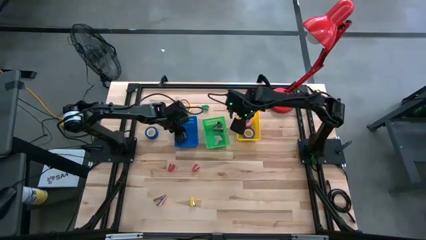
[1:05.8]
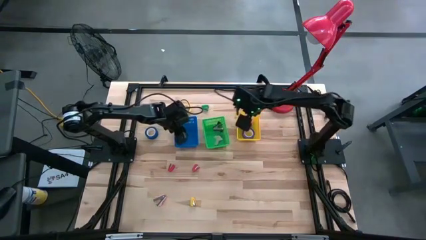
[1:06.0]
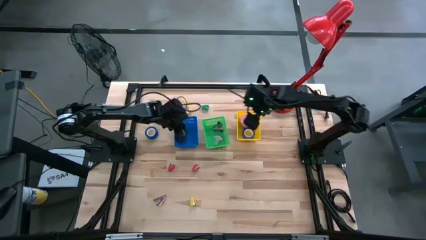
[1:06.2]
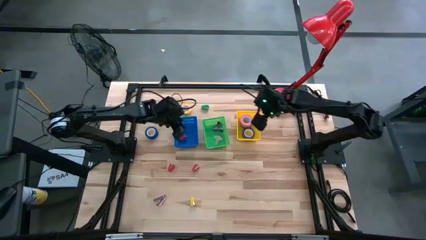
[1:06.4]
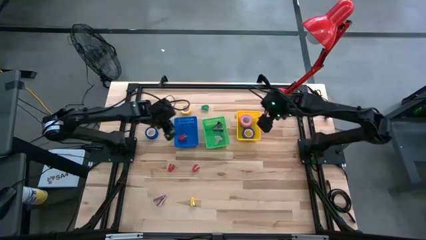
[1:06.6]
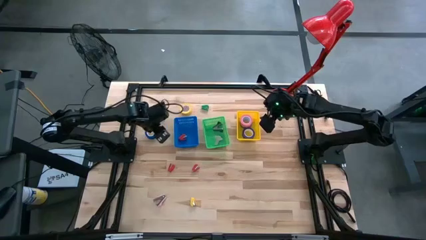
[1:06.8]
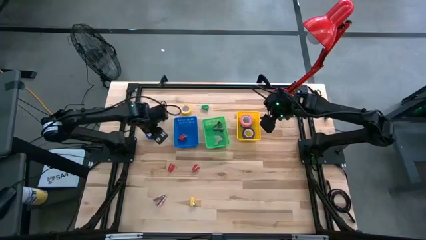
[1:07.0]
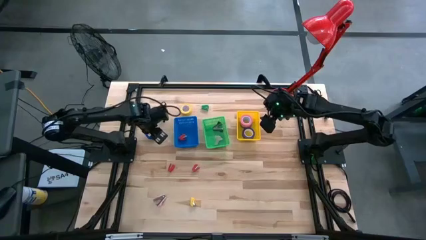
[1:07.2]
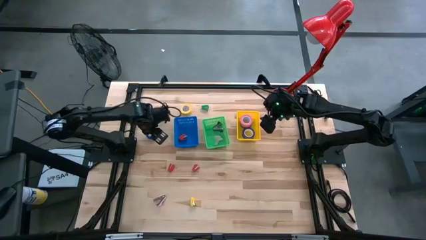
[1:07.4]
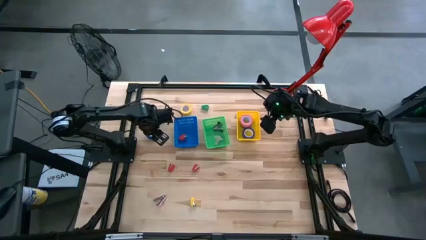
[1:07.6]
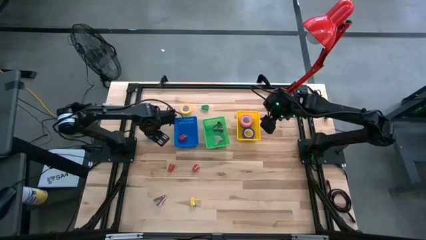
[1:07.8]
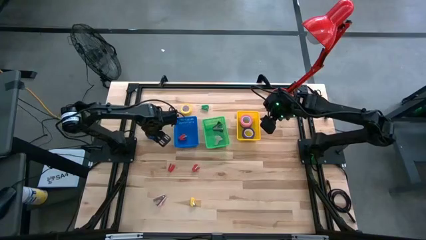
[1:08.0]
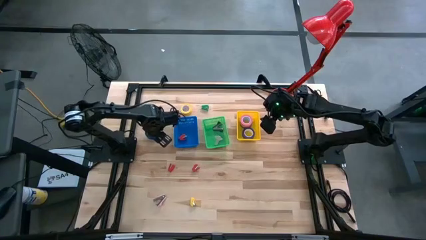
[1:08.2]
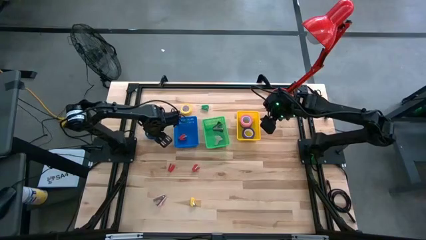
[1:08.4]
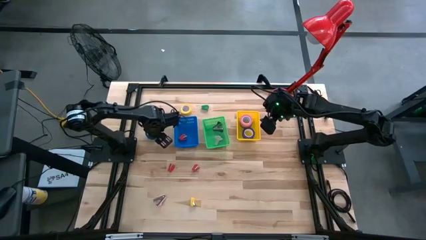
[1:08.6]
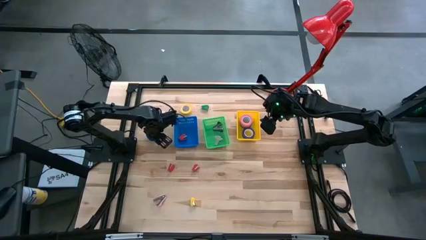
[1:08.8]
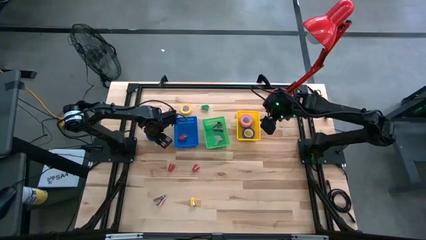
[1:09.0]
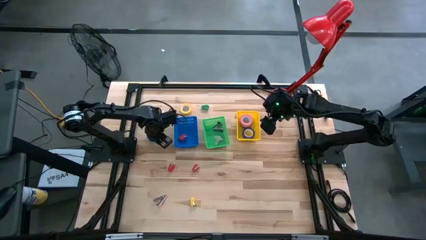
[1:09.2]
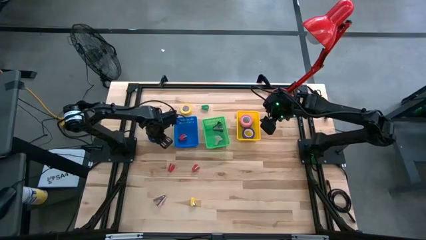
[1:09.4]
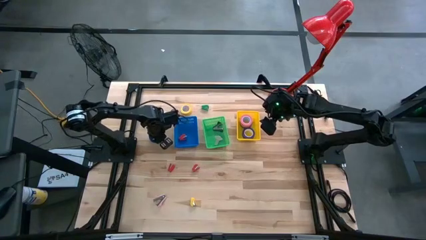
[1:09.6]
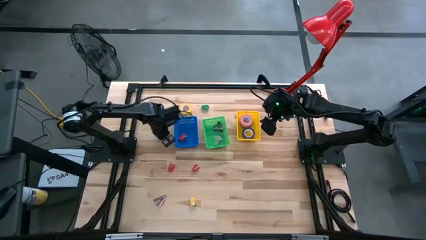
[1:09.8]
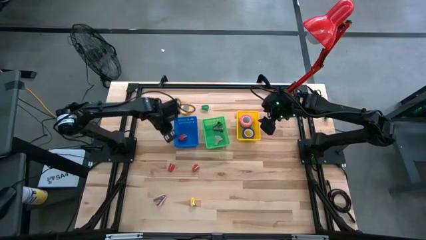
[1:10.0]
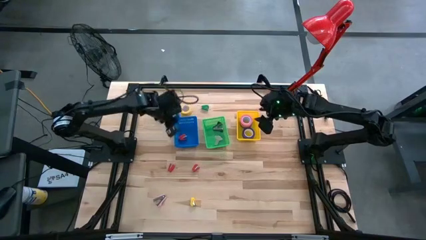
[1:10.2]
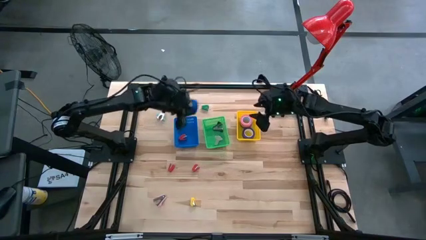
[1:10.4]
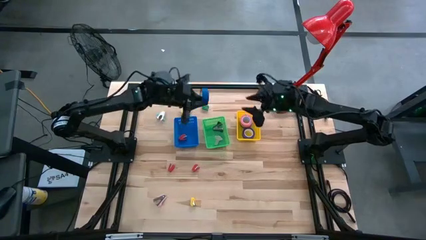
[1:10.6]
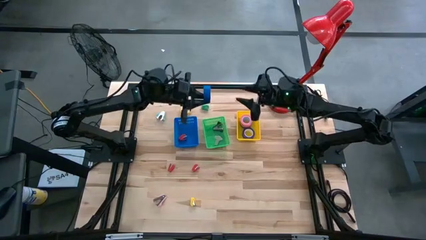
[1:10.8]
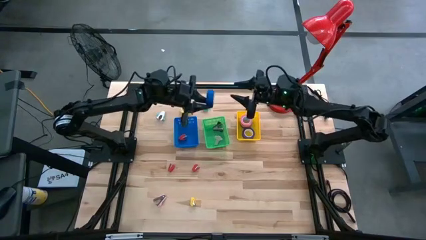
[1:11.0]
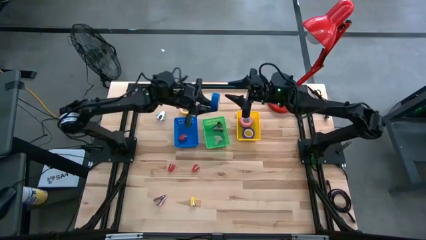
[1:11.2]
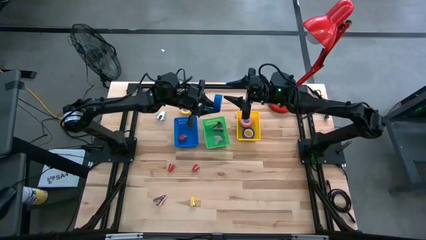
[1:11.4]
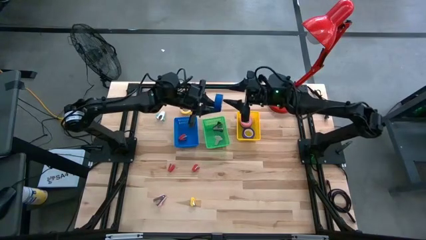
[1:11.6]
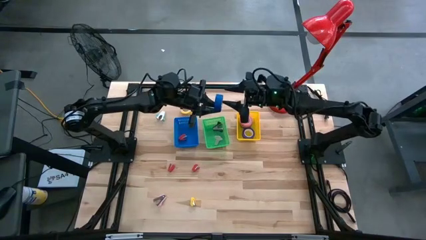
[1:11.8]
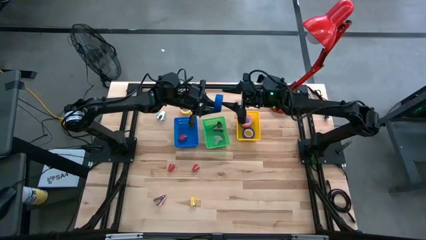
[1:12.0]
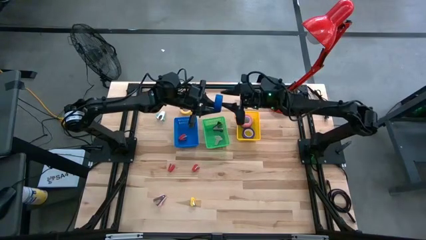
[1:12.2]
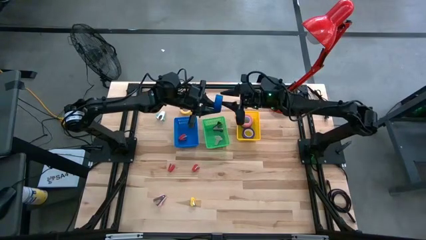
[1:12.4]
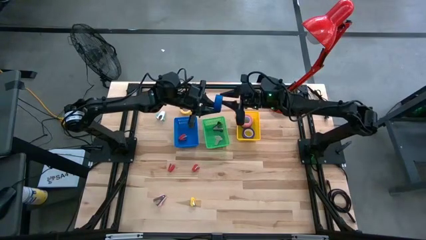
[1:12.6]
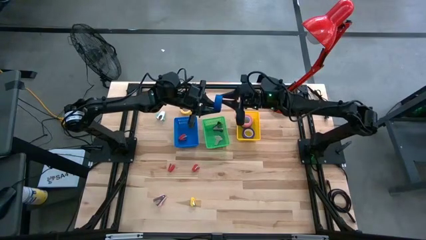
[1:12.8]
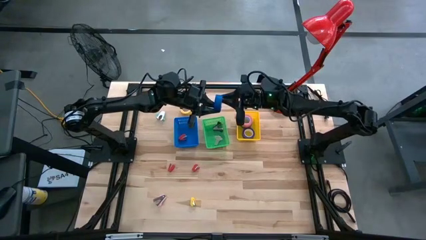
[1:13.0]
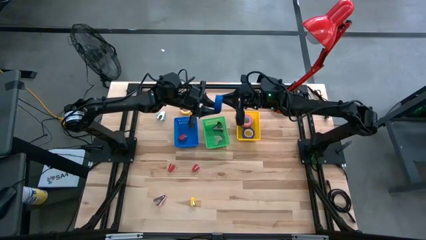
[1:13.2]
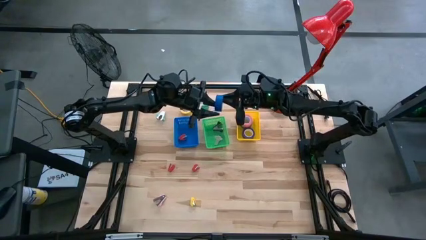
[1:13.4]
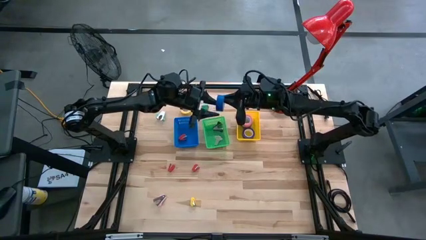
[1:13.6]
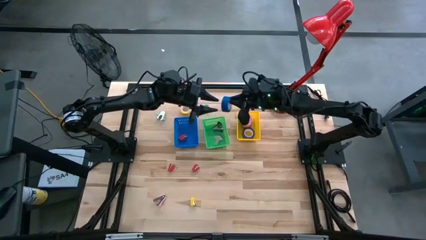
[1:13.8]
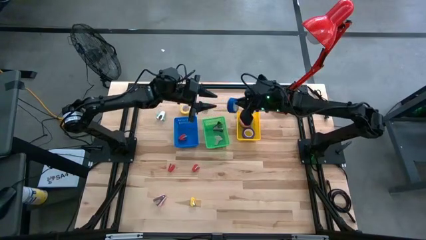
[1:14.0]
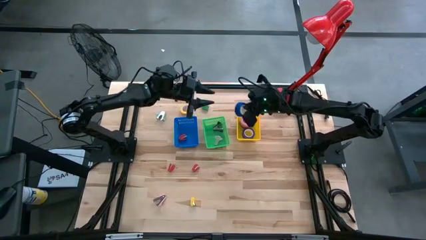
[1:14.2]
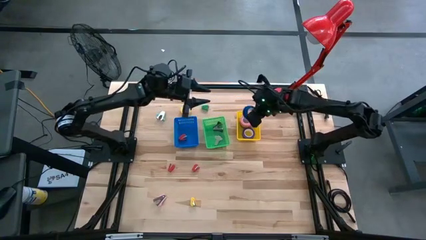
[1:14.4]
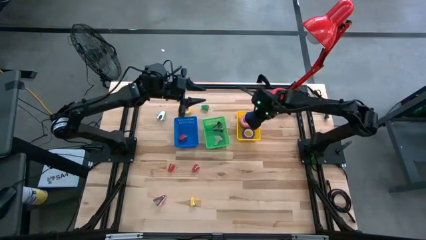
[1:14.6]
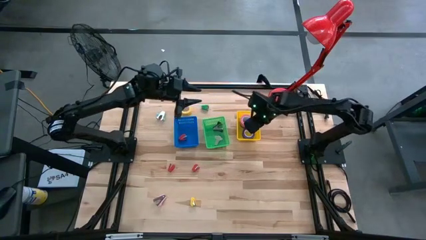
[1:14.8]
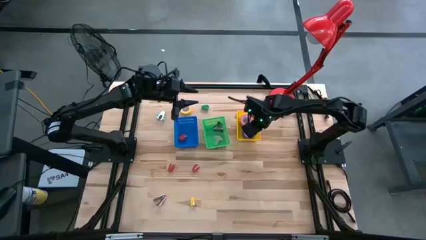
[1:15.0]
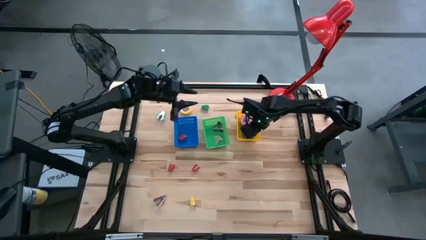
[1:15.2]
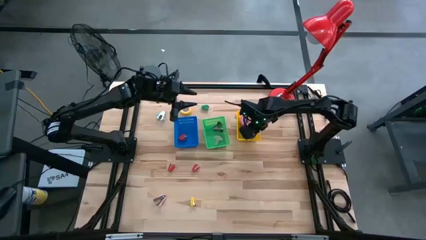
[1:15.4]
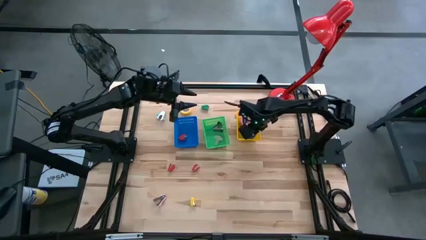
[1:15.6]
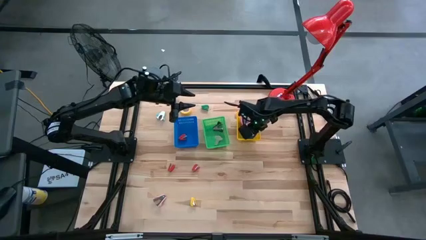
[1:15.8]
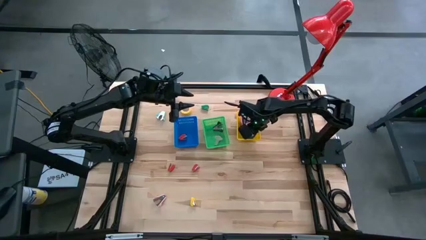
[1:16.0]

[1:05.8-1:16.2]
Task: Pick and place Stapler, Stapler remover, tape
Put the dark blue tape into the yellow bin

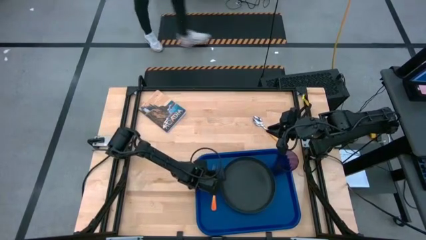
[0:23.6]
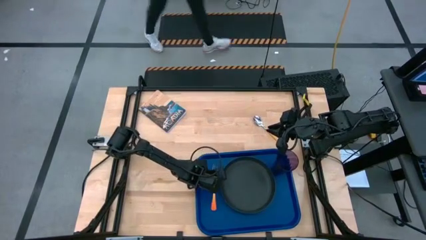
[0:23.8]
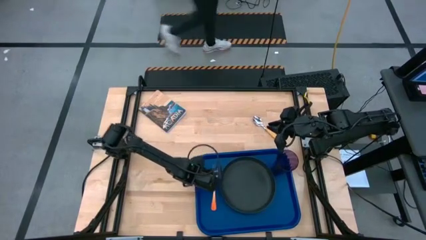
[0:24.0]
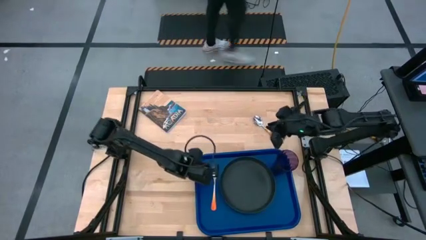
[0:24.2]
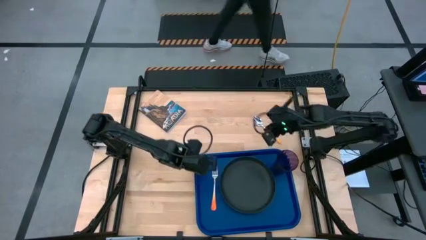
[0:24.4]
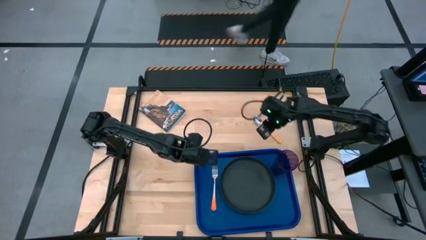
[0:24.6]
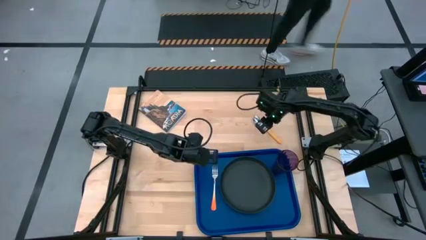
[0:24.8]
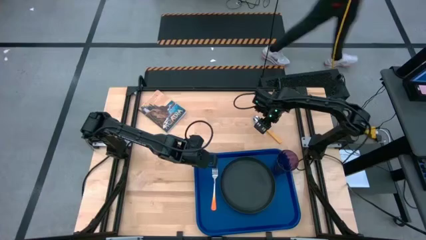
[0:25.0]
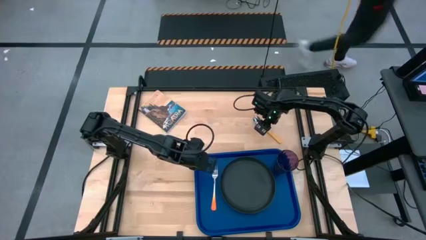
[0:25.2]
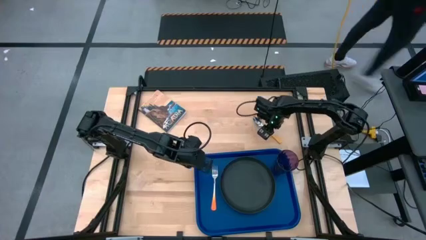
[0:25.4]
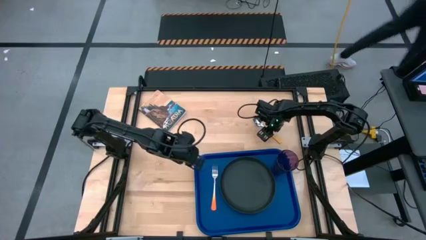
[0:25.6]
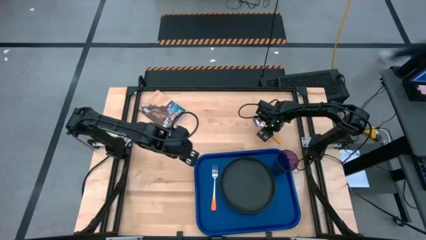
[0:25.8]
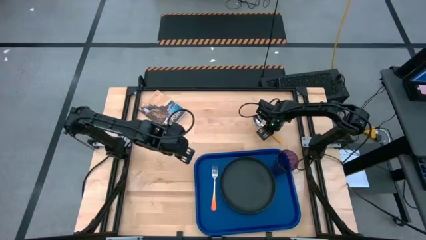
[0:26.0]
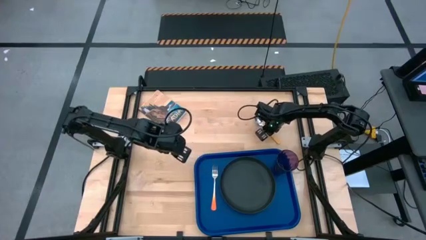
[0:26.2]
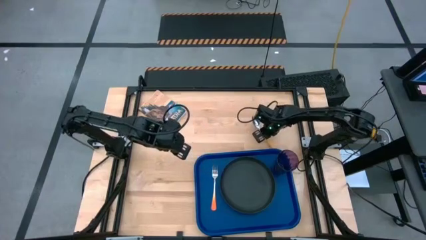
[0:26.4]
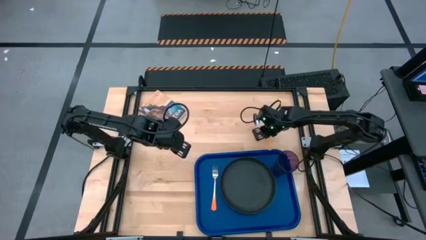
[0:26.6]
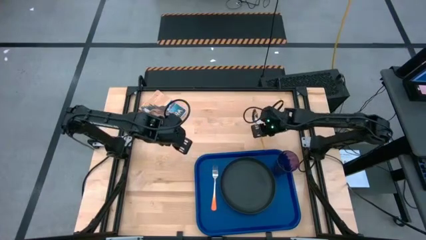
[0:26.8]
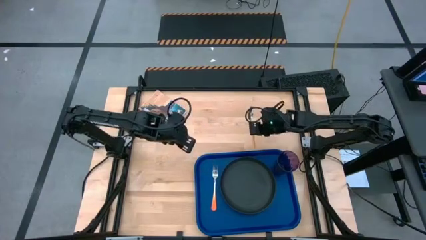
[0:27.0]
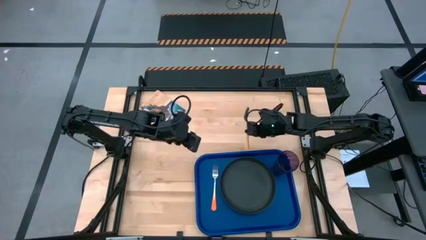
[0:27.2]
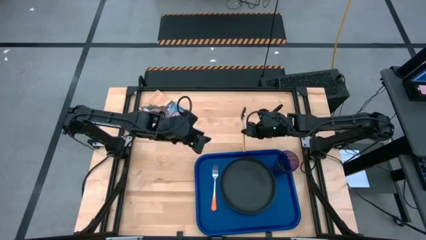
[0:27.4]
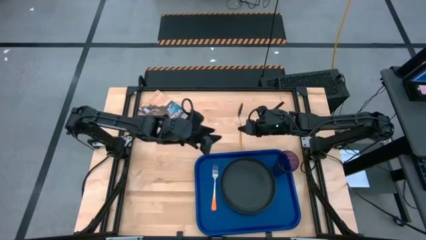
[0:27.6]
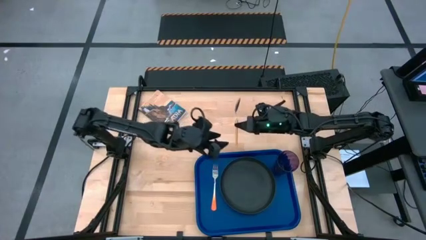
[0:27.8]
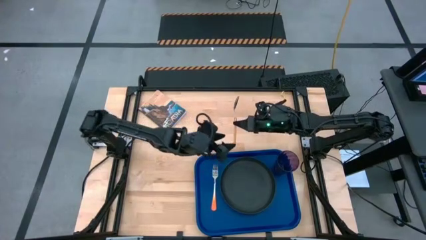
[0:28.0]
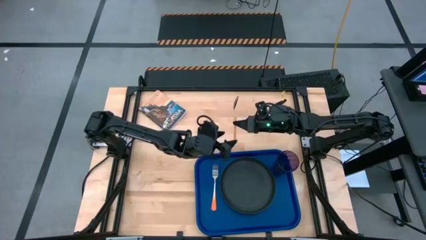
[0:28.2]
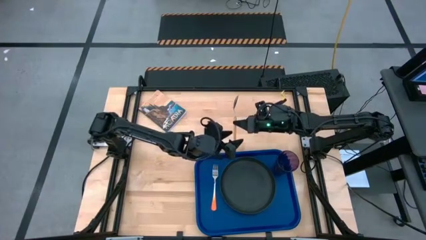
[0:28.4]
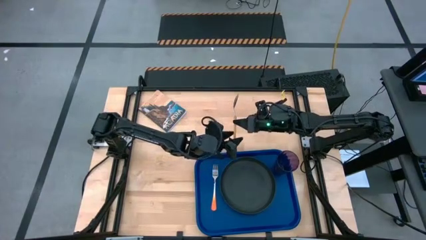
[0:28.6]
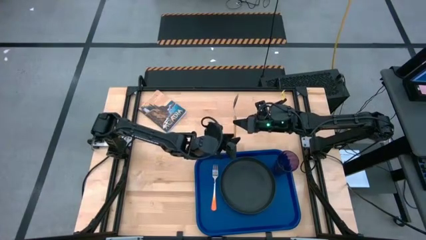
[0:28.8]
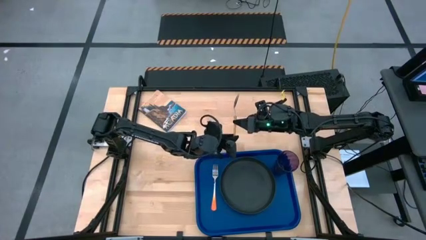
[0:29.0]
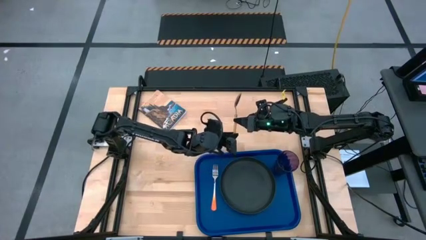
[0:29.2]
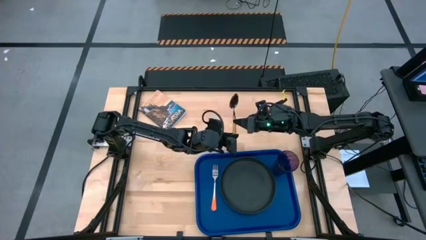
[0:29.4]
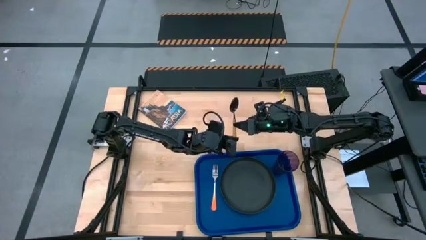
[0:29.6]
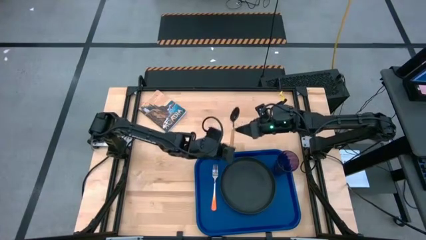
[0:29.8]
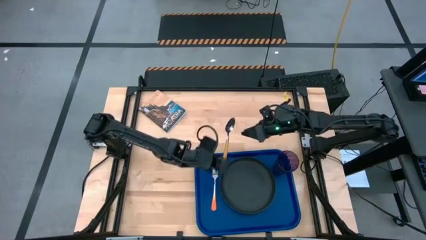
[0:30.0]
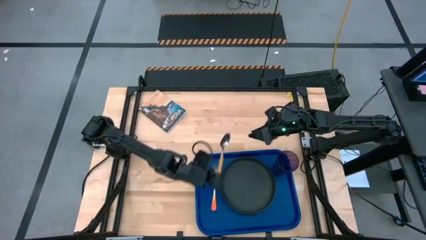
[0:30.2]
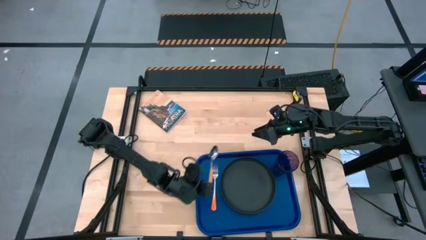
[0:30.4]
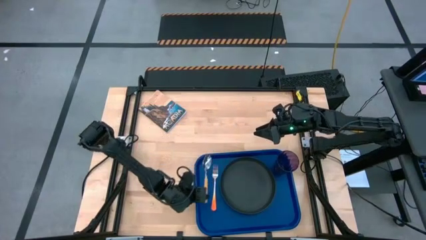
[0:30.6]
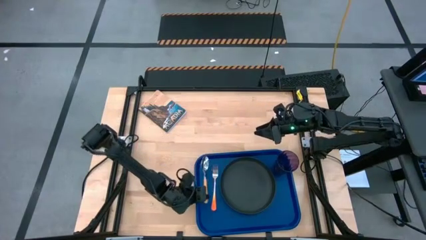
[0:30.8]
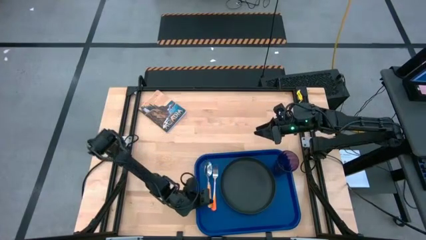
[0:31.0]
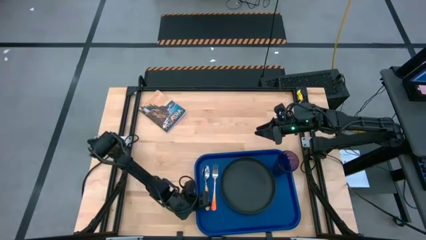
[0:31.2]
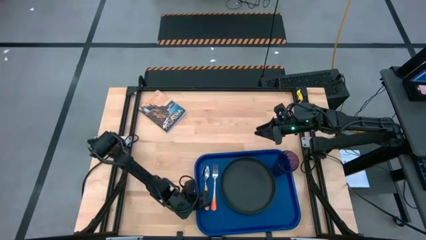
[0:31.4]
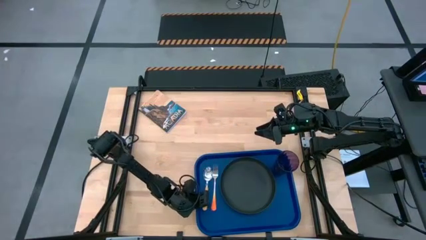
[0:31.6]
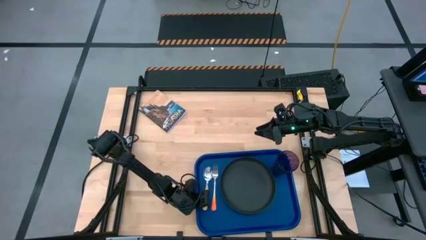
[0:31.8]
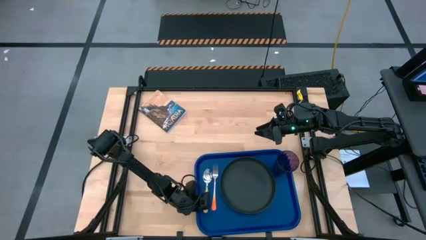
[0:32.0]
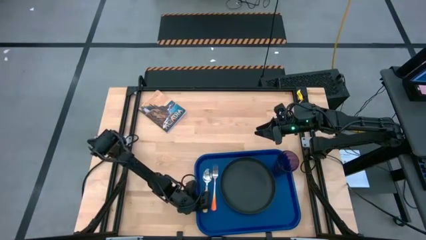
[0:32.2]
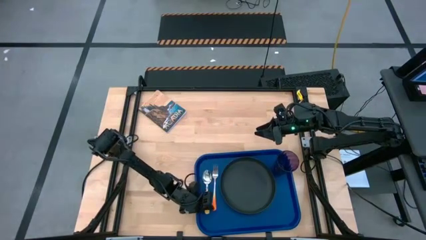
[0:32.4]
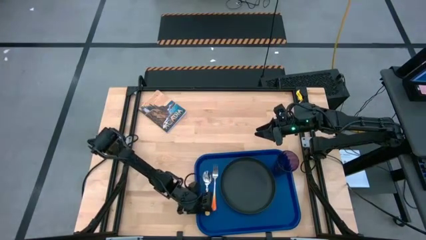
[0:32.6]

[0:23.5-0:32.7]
Task: Pick and place plate/cup/fork/spoon on tray
Put the yellow spoon to the left side of the orange fork on the blue serving tray
